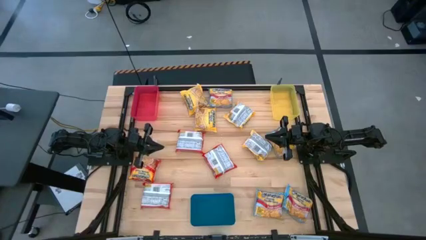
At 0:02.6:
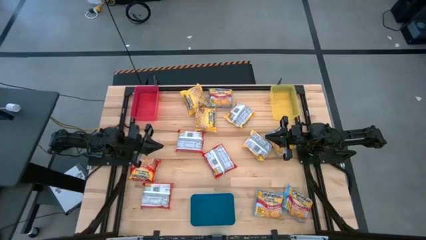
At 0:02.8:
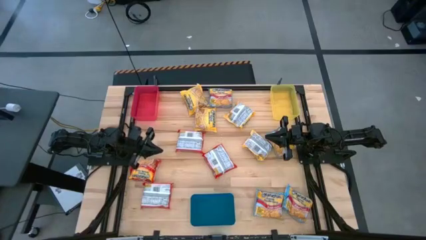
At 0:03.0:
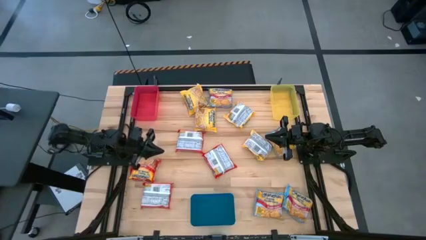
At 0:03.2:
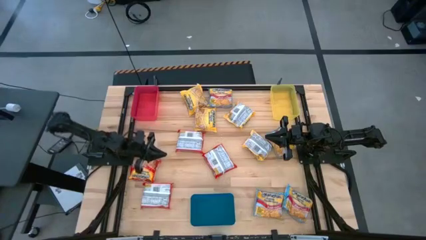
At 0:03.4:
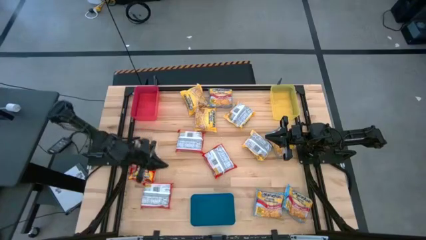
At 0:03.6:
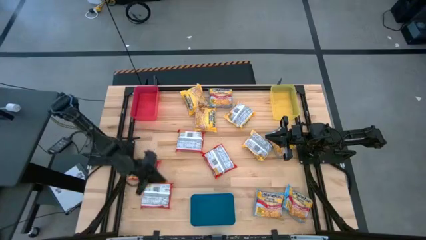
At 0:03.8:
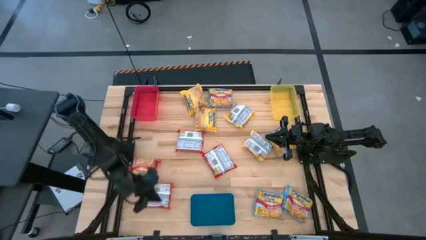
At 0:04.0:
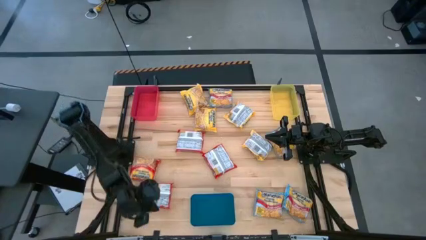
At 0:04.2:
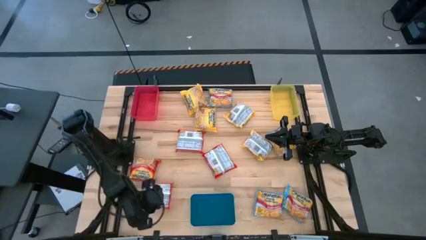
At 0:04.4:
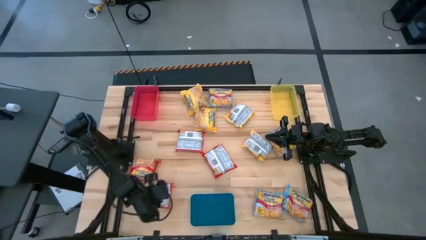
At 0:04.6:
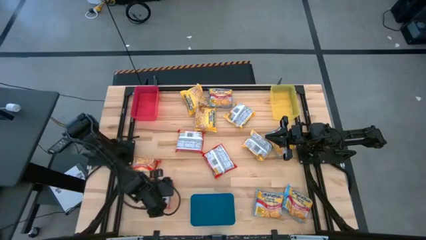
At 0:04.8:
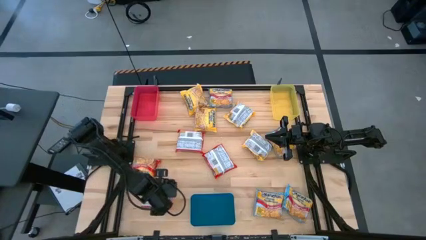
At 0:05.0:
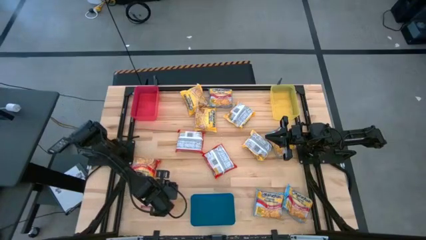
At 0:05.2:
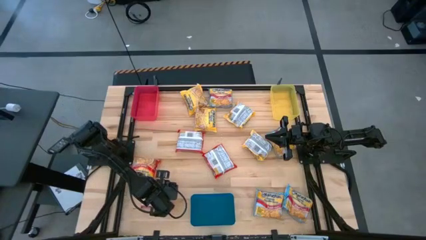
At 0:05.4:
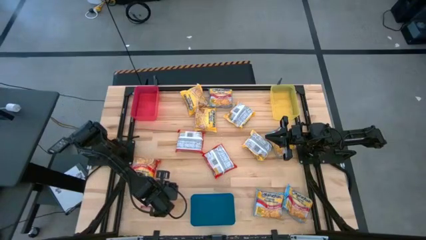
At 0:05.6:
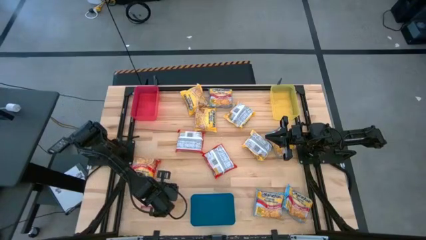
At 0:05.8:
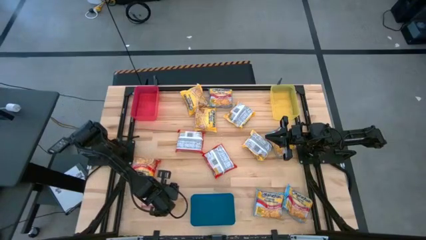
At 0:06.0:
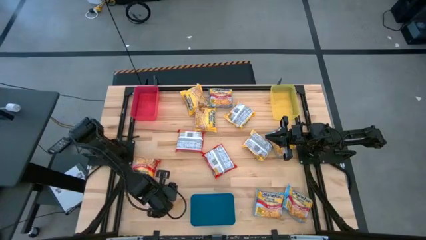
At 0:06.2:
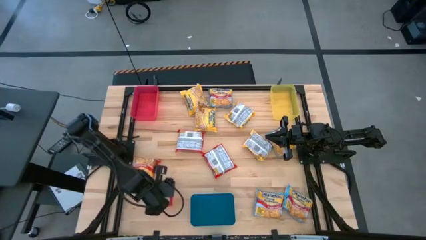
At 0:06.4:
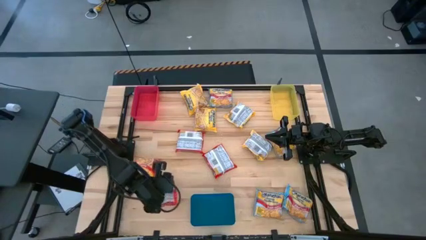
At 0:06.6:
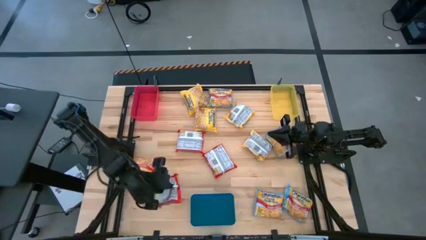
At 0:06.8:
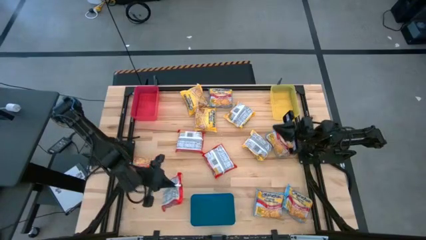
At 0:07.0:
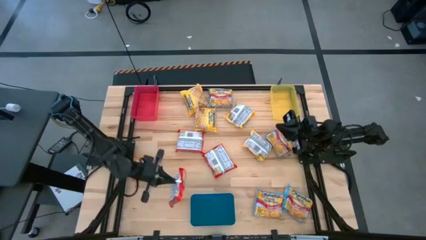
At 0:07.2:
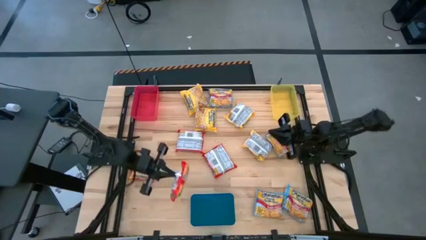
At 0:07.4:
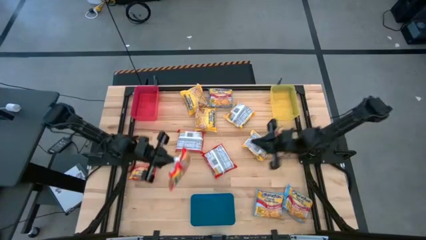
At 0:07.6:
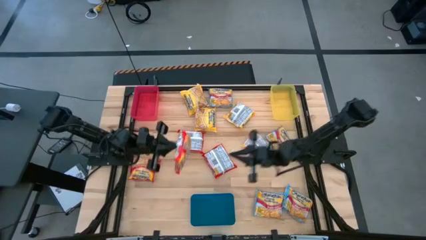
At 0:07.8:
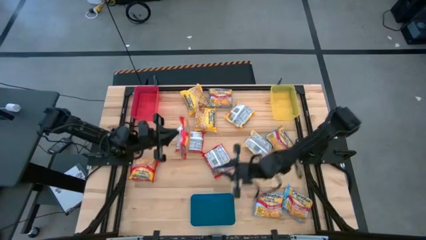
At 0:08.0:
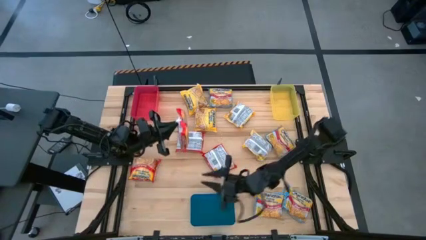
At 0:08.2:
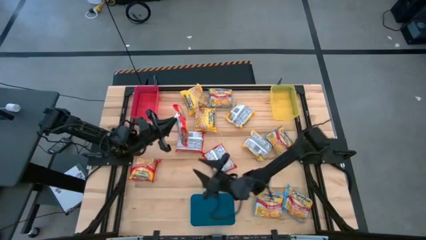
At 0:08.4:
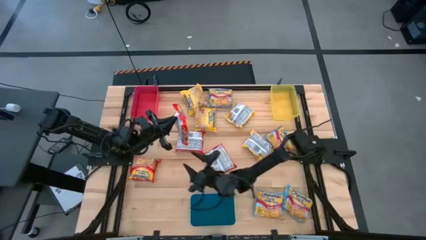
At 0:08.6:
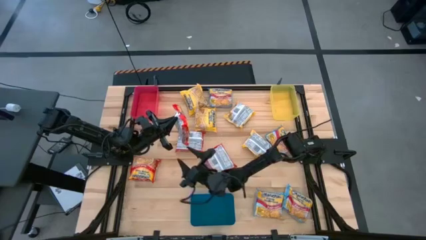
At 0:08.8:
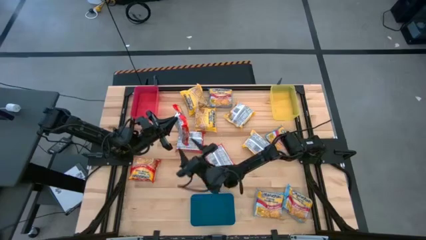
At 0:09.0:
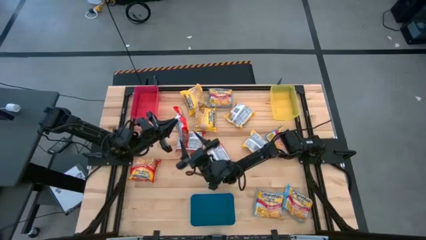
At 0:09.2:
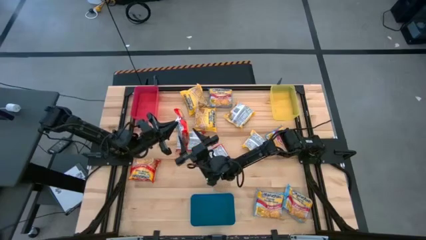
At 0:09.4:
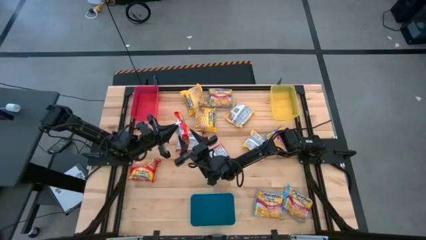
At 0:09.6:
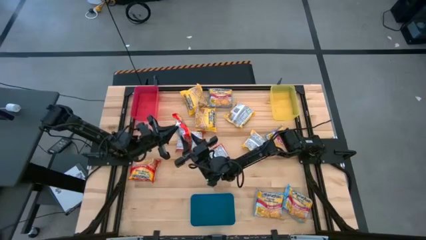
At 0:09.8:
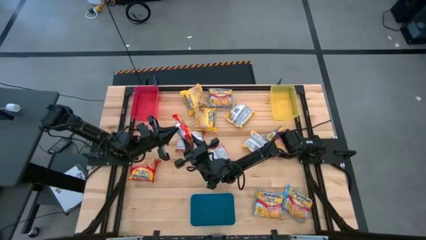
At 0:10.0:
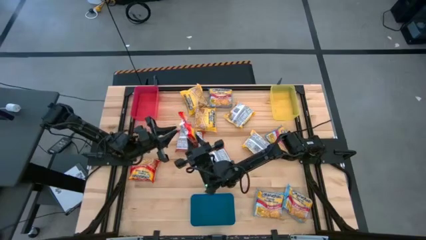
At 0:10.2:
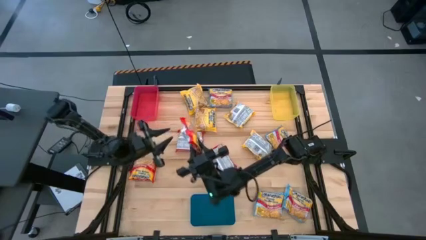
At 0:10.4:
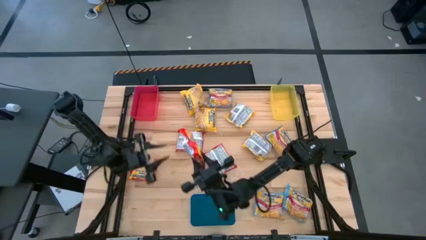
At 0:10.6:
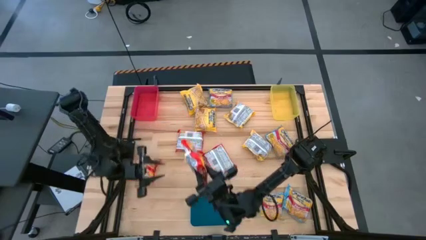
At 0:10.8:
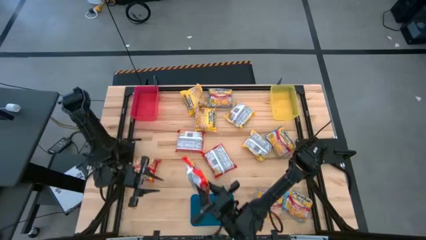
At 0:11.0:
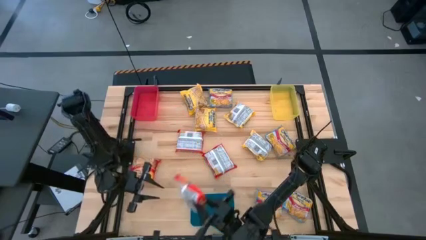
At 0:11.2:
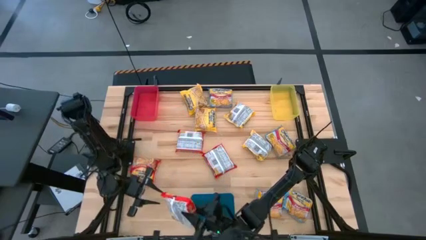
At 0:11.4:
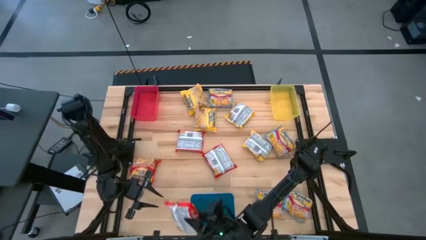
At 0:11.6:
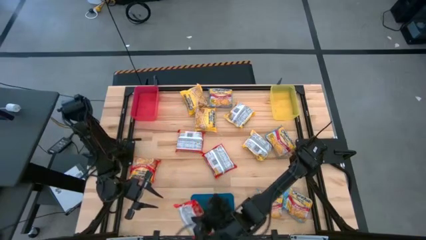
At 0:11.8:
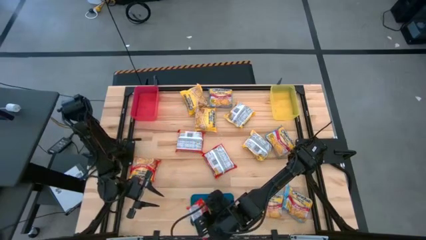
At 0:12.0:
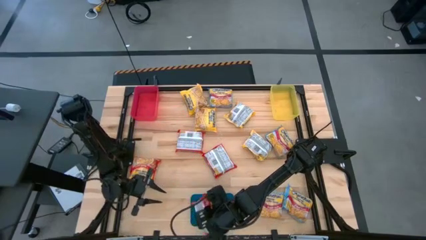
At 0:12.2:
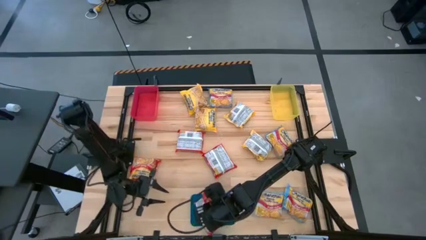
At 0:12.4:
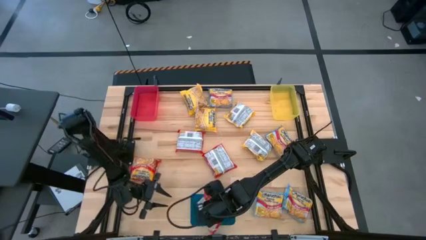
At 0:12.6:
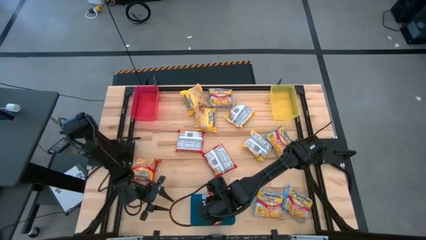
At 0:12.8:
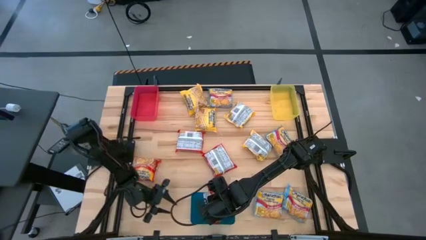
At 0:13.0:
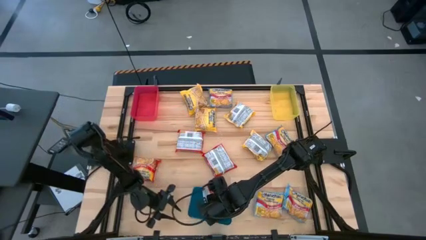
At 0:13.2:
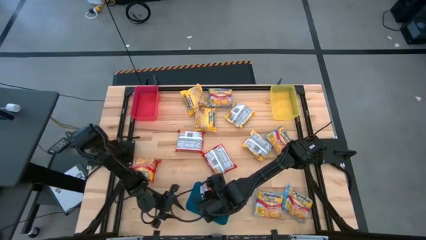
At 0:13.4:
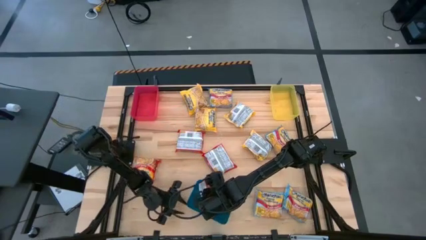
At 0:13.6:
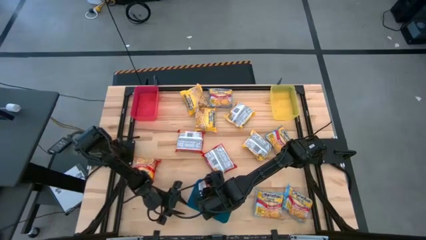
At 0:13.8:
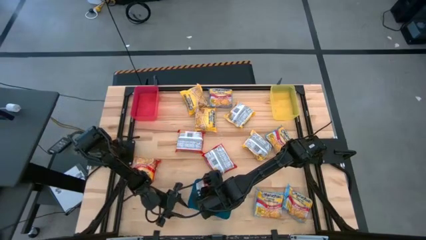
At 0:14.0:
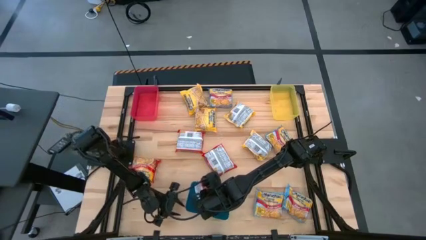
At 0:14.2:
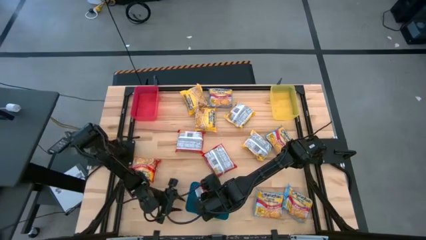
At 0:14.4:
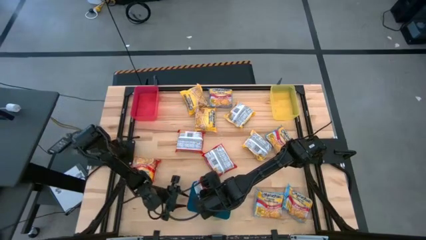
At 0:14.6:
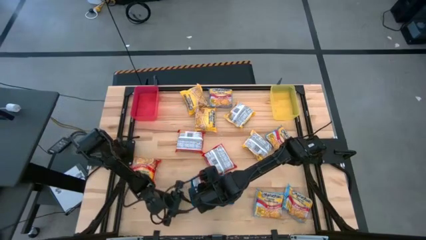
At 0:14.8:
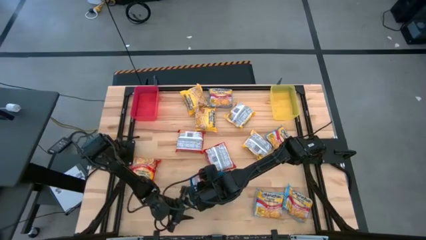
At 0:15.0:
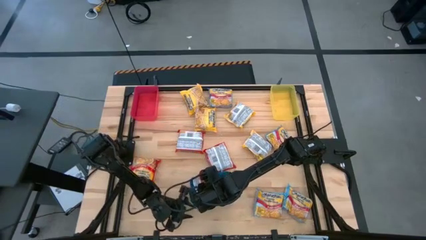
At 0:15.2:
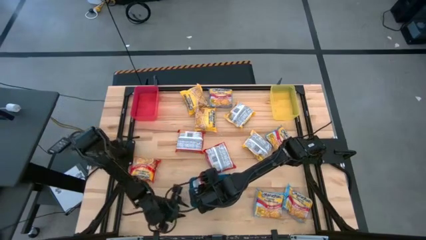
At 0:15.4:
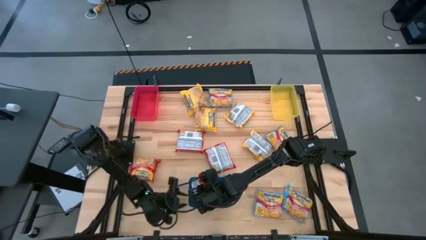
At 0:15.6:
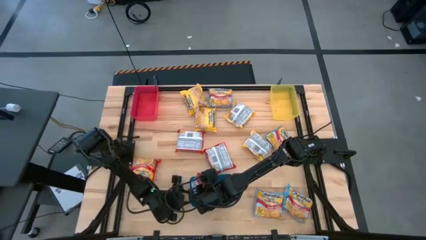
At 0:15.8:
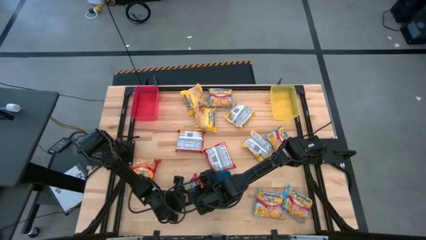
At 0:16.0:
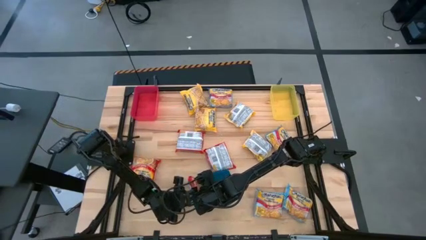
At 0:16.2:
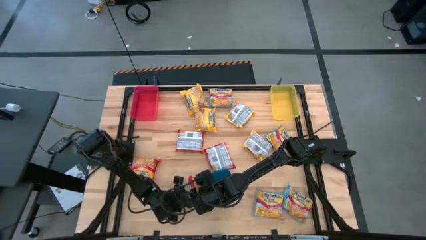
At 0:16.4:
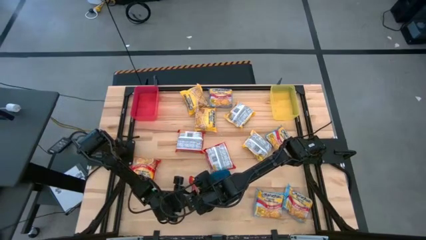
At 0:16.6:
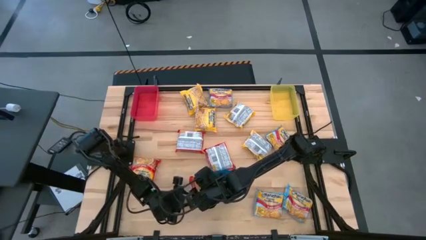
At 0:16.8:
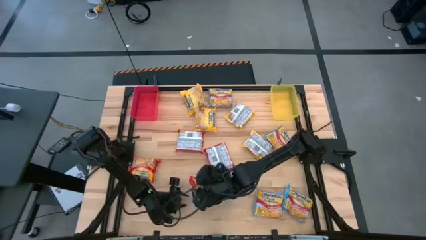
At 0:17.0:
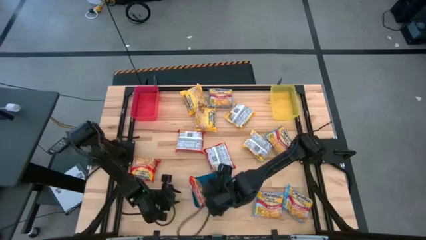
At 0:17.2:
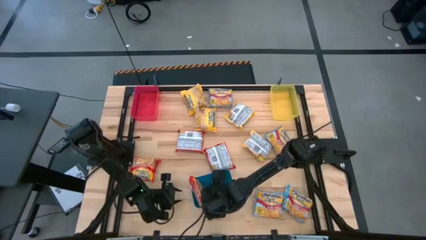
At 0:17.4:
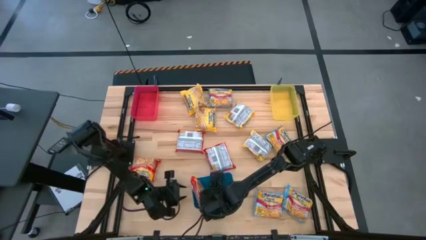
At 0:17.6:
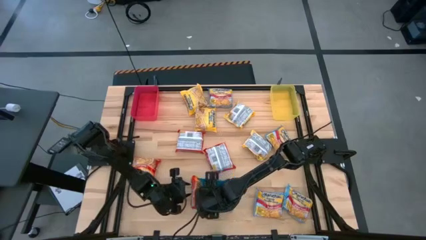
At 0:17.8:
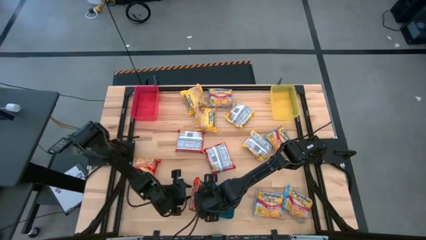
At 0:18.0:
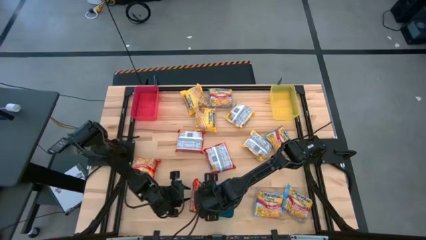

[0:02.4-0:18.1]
Task: Sort Maruchan noodles
Put the bottom left red noodle pack into the blue bin
